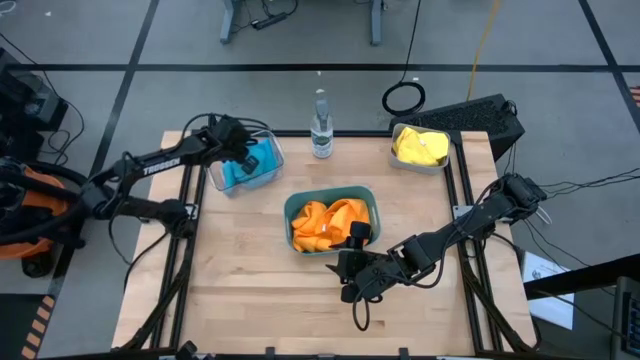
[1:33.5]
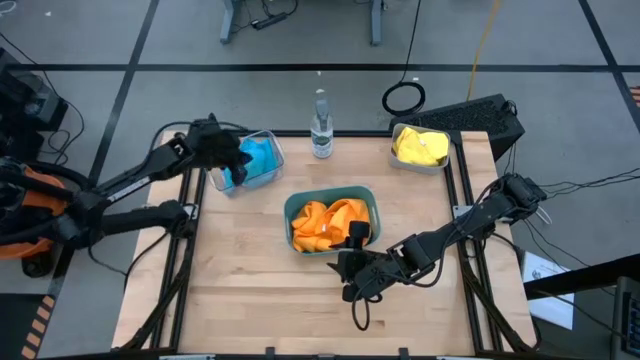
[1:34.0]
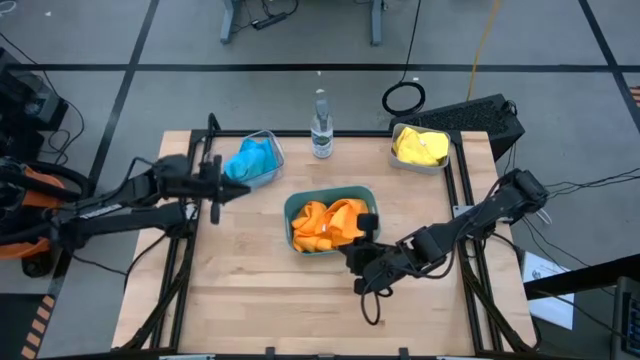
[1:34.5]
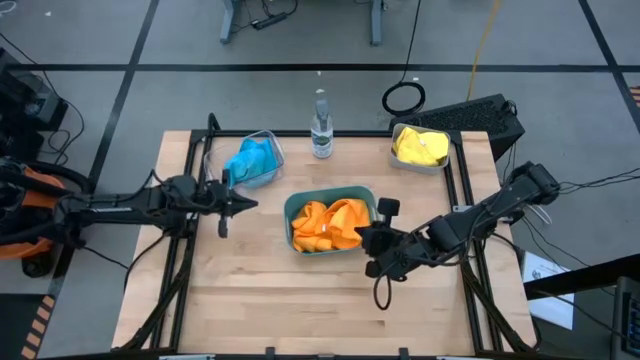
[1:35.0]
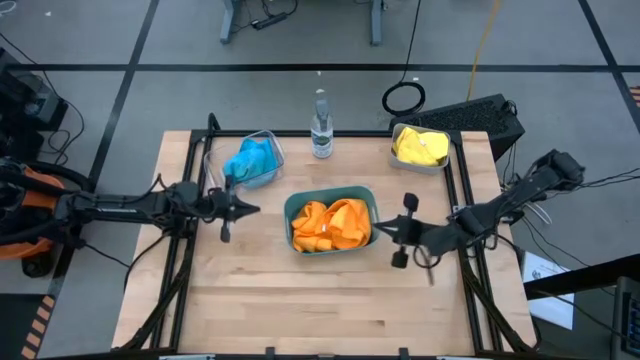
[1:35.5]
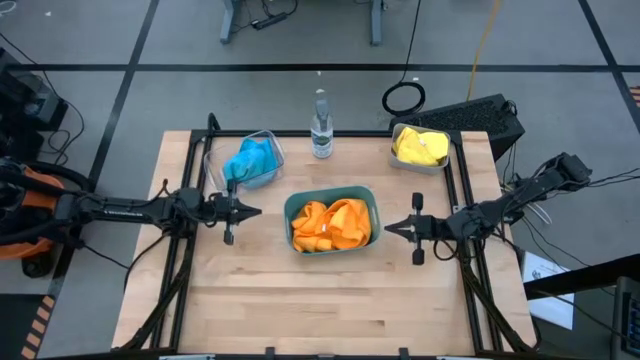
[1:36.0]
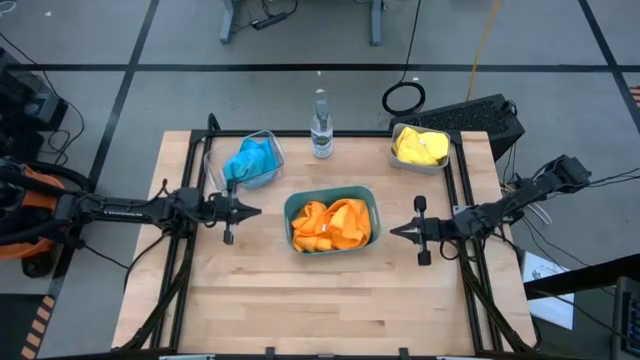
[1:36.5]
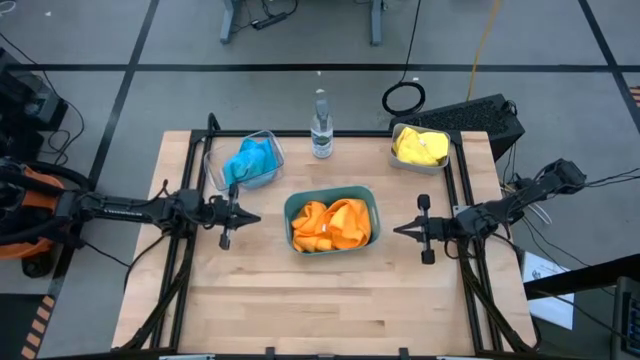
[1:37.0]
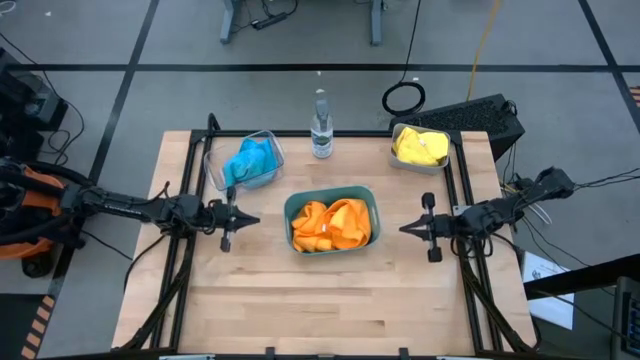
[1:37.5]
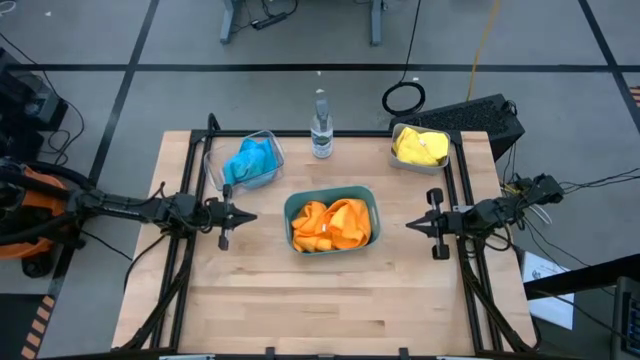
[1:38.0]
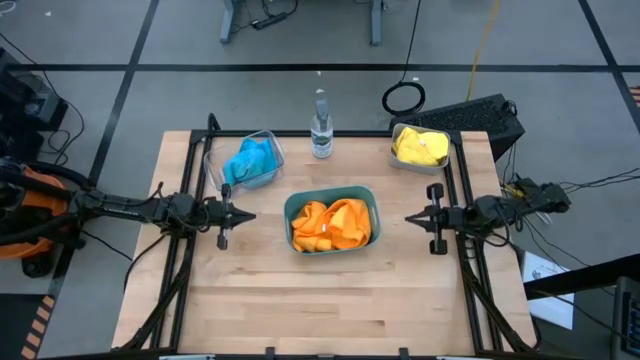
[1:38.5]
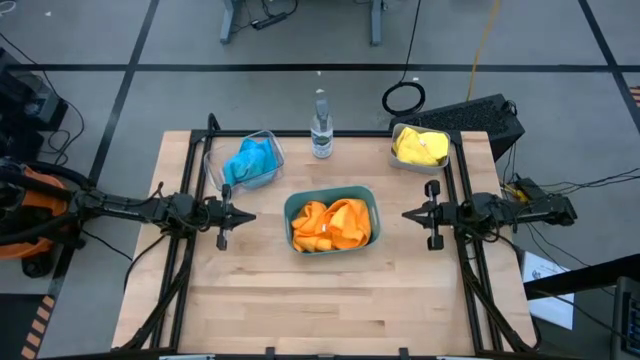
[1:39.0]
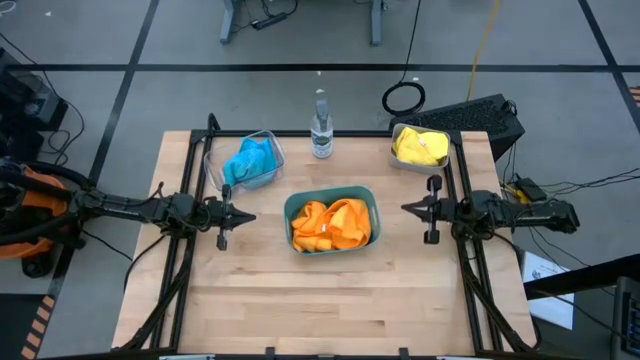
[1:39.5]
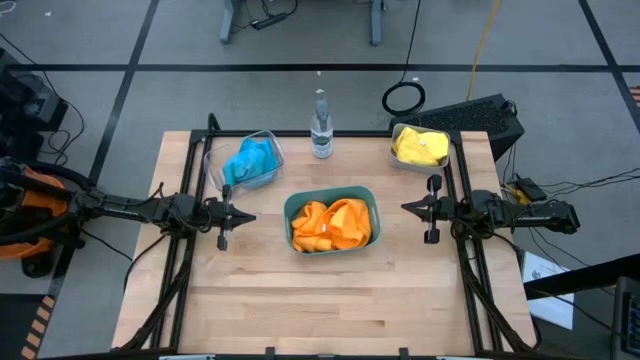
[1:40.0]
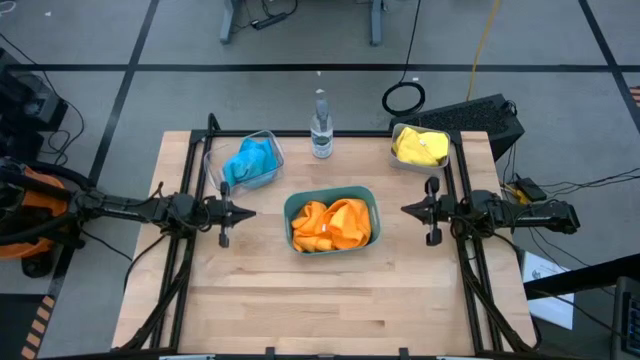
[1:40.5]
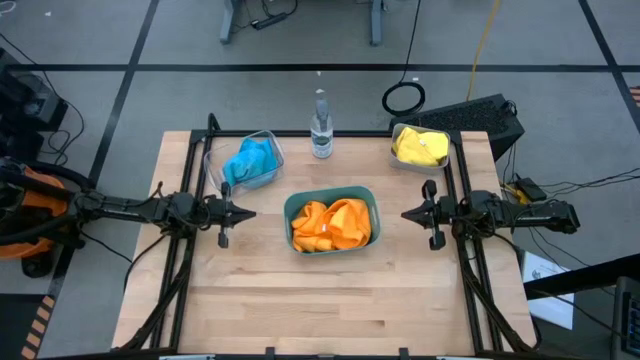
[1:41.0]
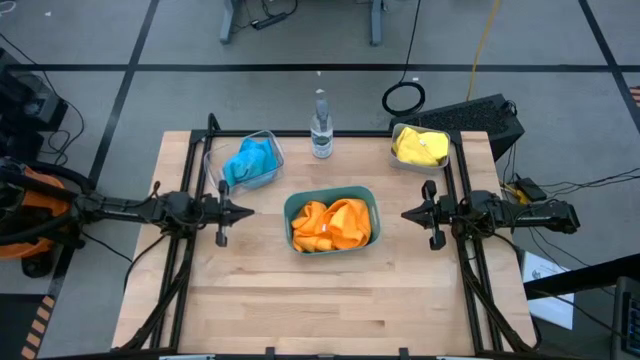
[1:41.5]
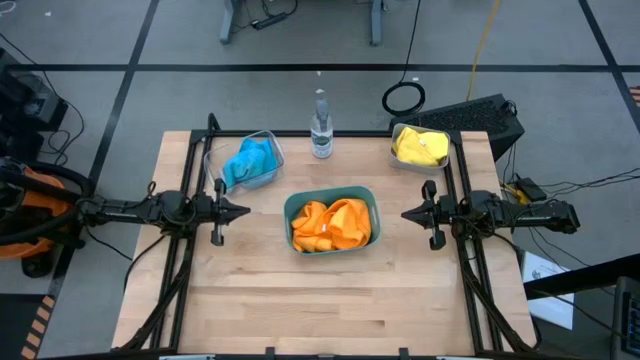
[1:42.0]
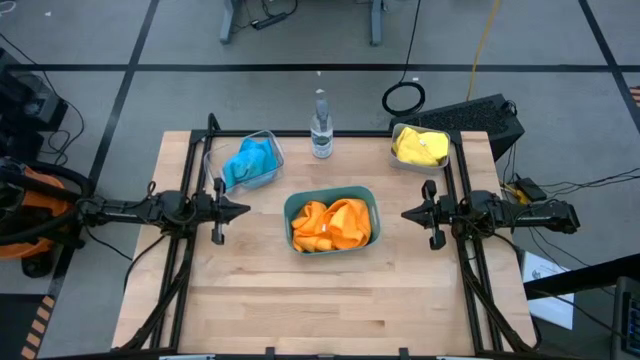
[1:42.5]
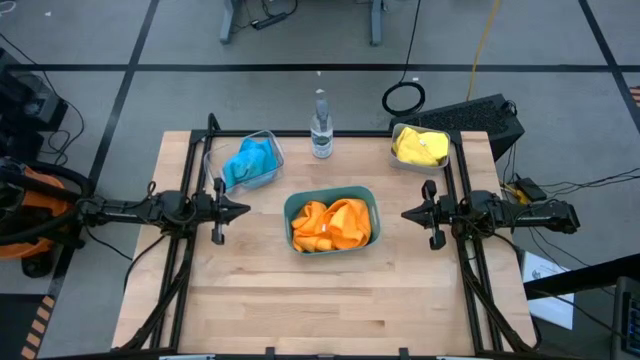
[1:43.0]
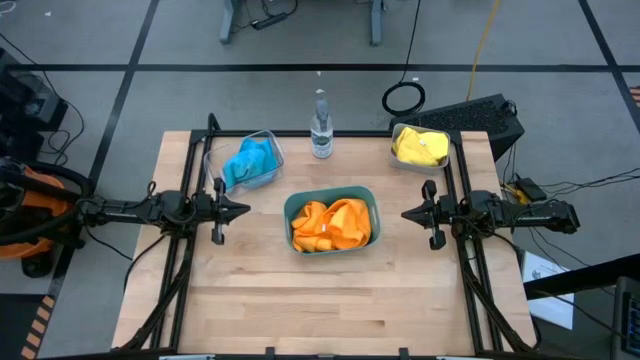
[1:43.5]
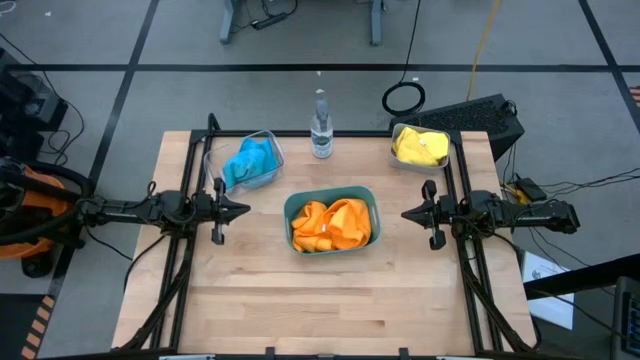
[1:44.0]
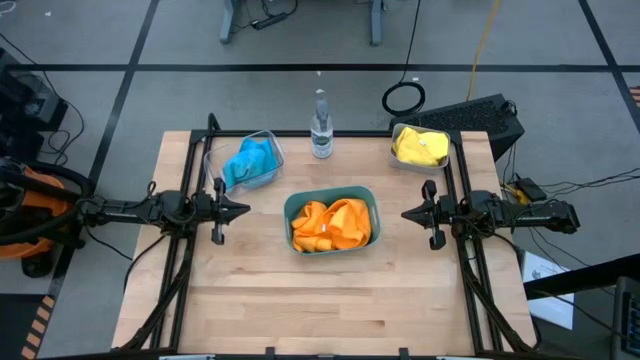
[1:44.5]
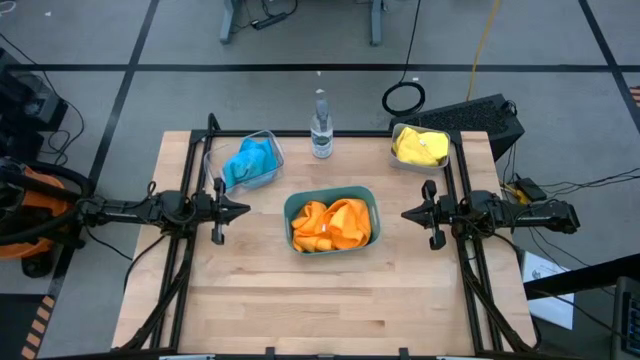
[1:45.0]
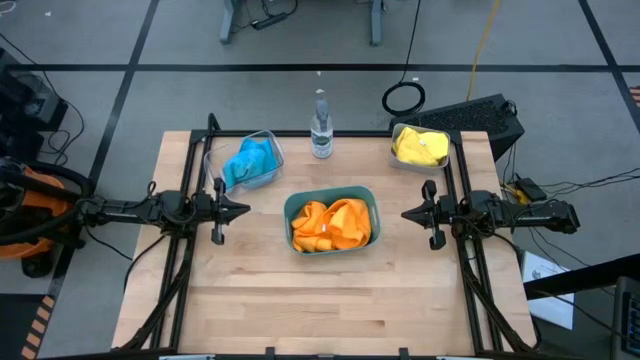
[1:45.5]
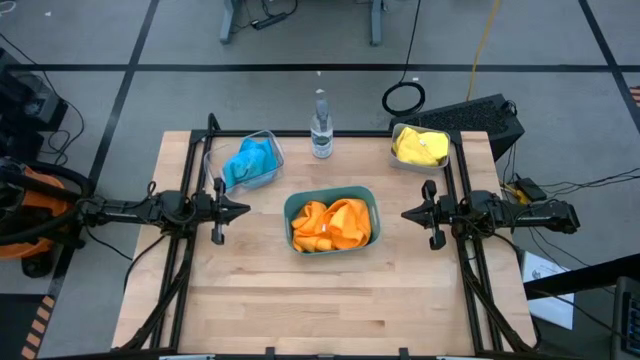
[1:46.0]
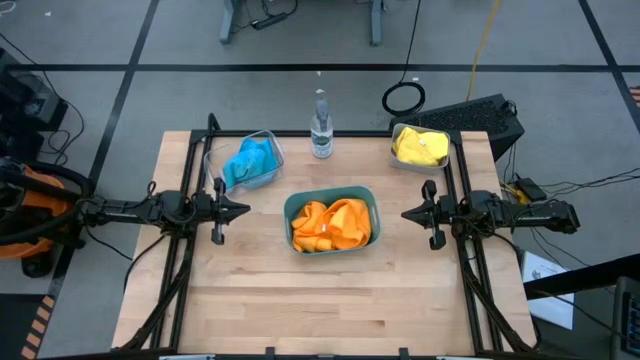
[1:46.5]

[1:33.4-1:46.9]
Task: Sort microfiber towel by color & place in baskets
Return to Home Position

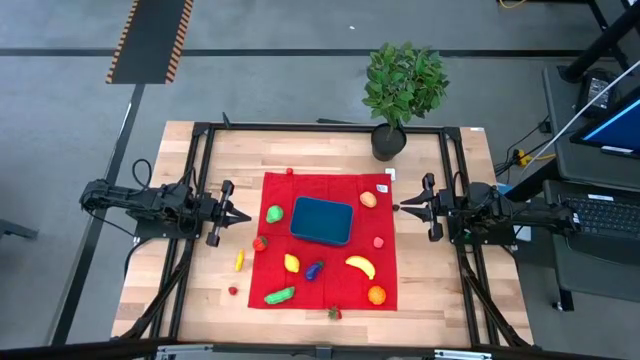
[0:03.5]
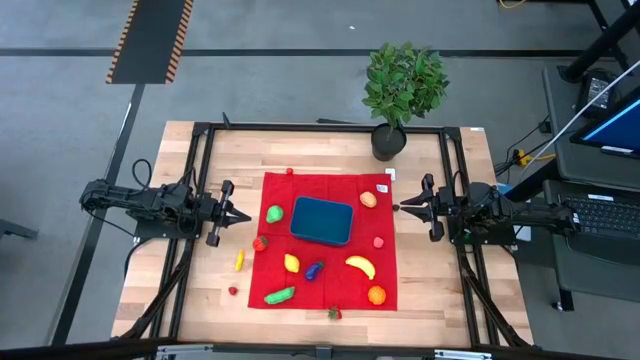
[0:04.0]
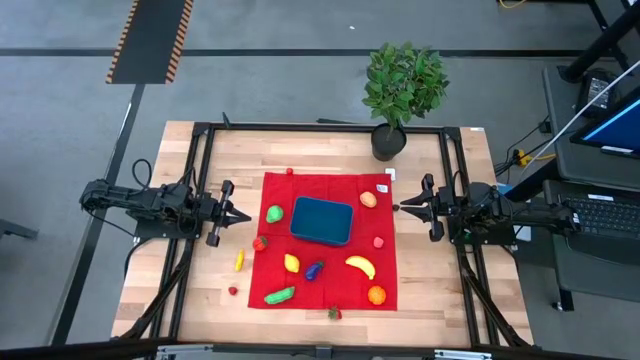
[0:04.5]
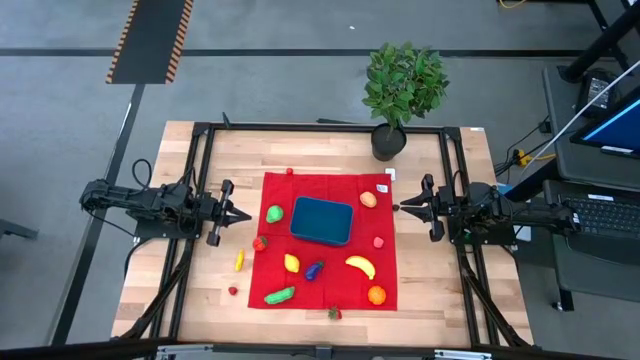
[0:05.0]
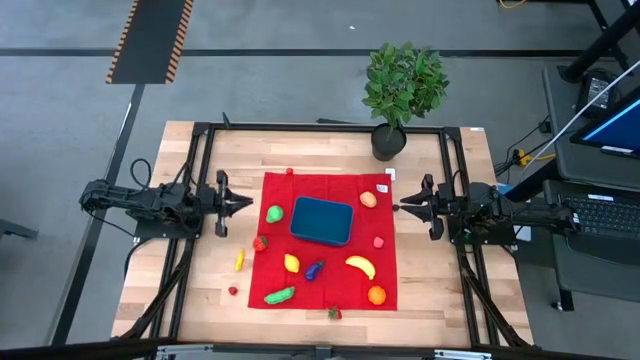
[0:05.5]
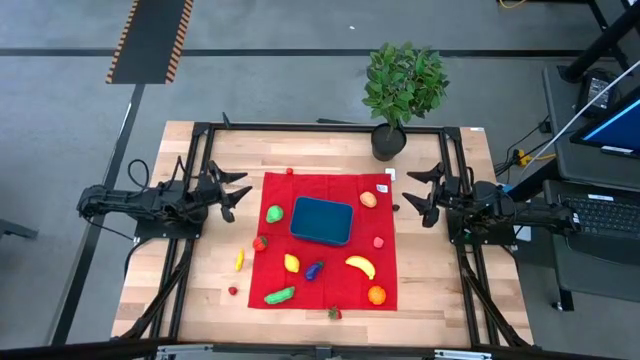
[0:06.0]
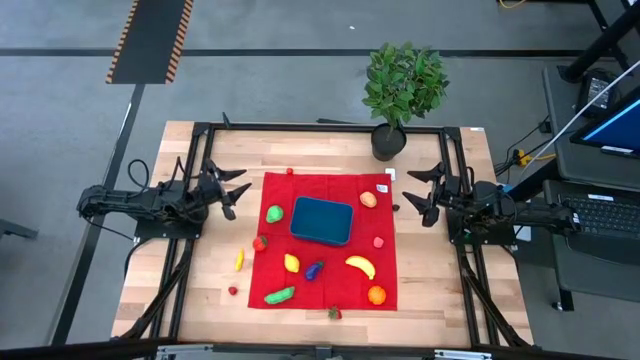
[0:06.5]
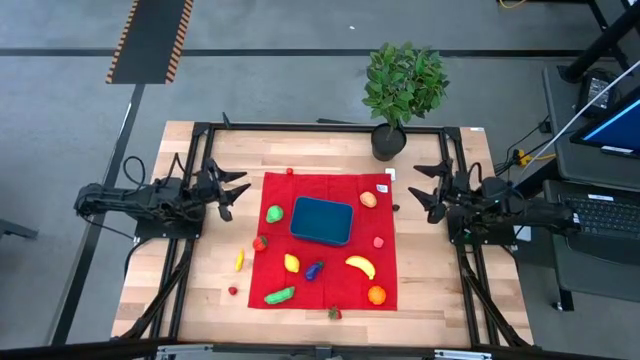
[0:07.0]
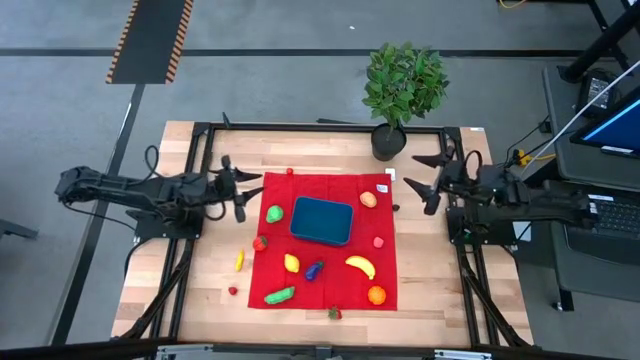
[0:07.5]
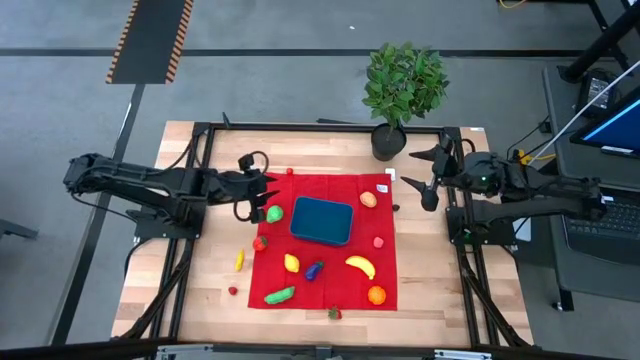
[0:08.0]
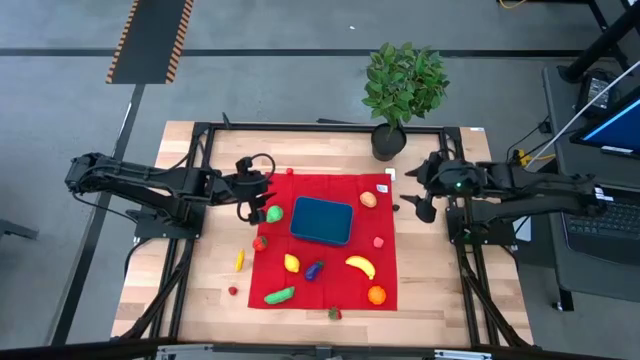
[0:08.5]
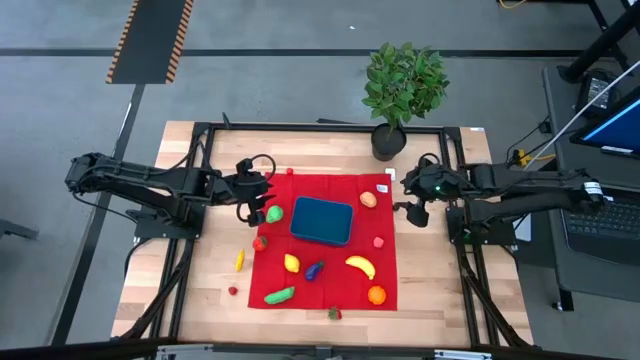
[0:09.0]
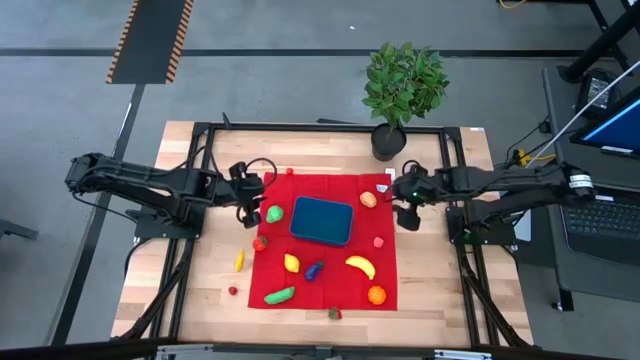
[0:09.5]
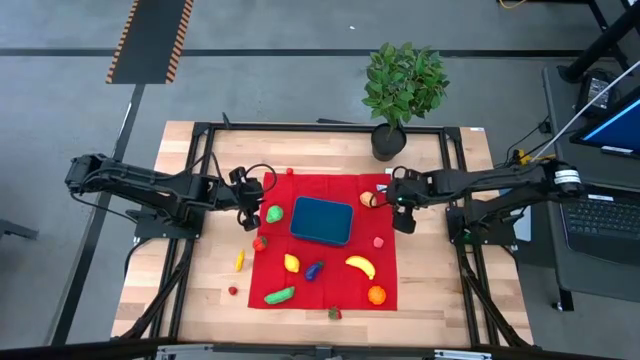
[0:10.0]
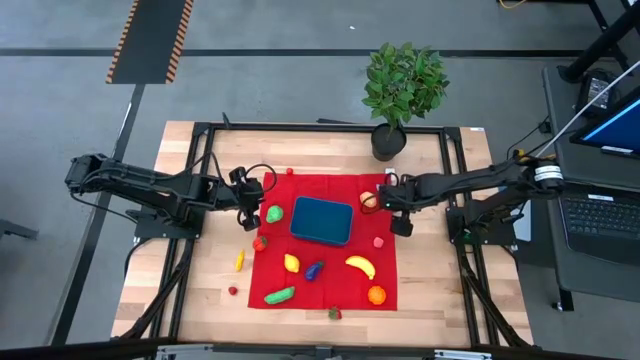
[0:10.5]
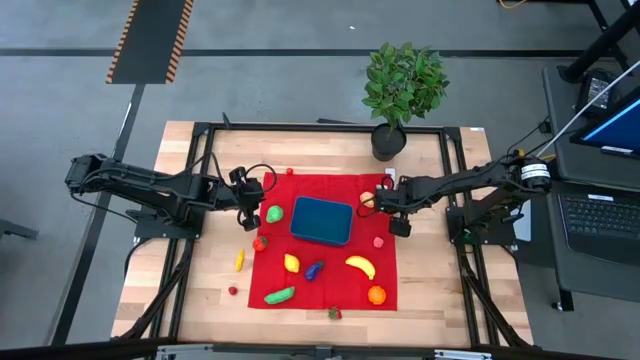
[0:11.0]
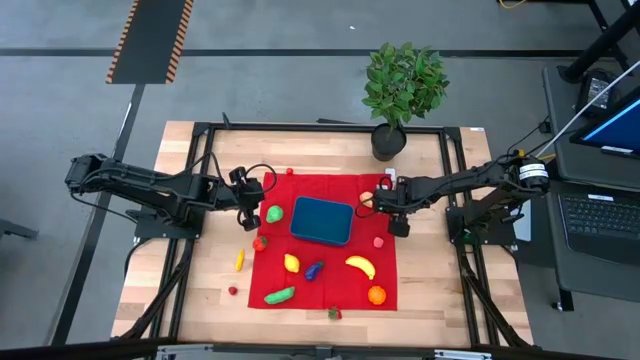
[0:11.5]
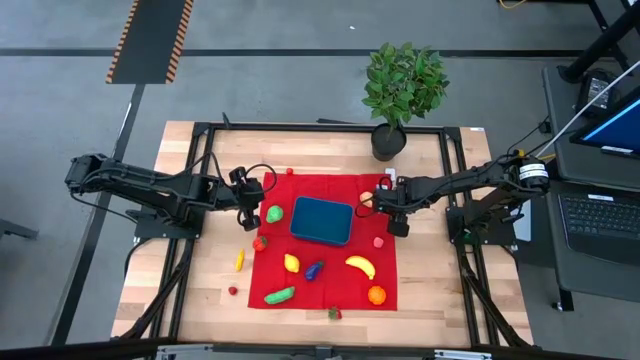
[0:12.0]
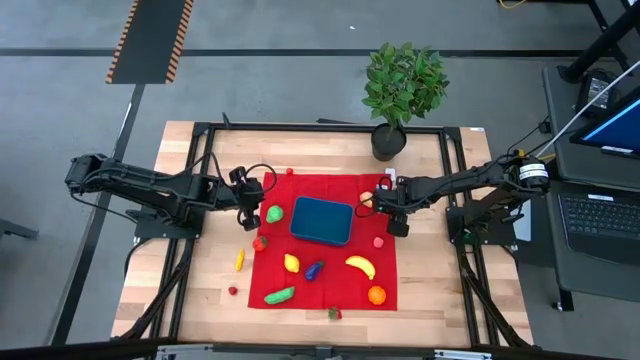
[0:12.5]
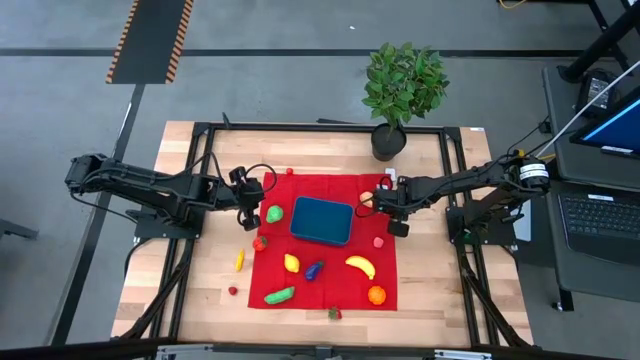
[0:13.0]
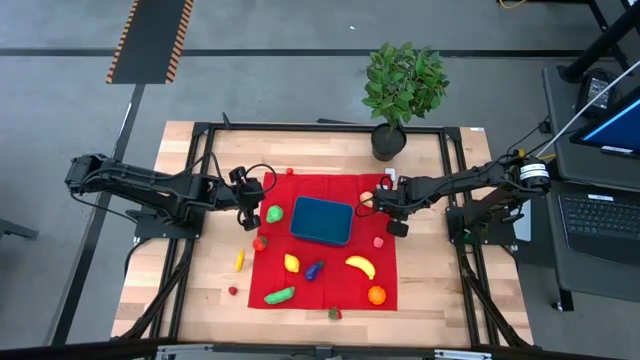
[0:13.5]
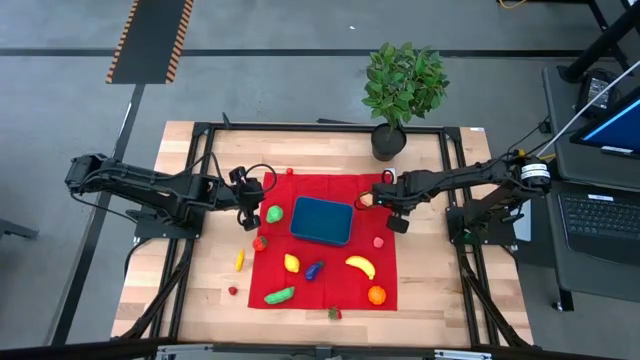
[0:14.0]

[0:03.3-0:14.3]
Task: Pick and placing Produce into tupperware
Put the blackberry into the blue bin
